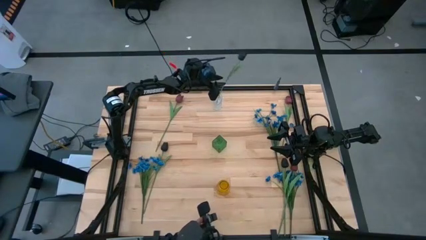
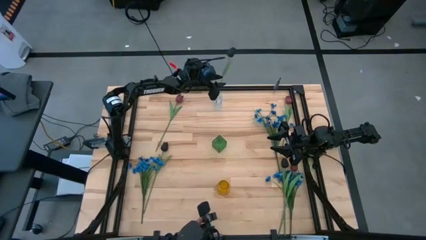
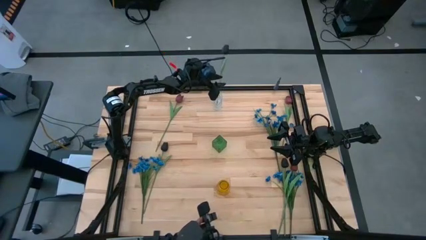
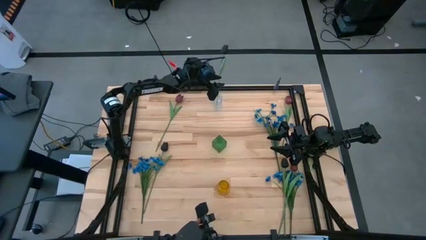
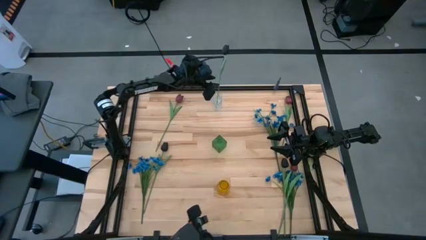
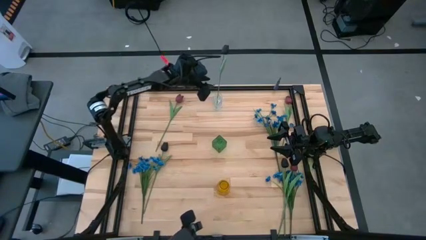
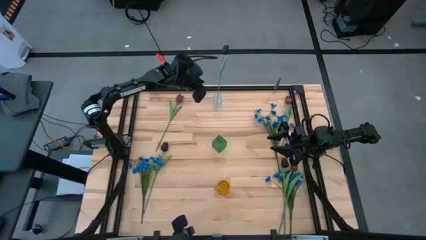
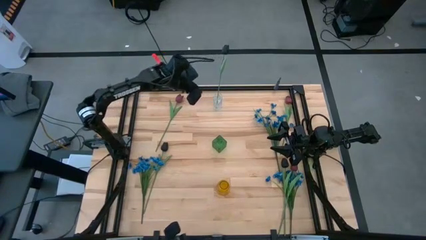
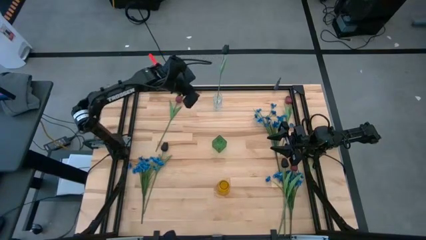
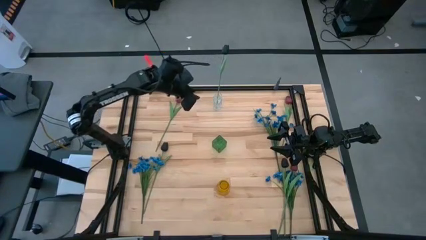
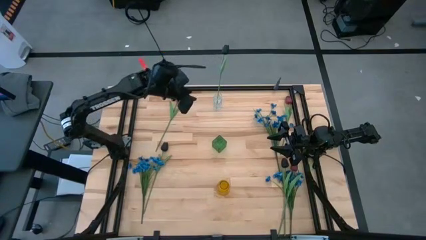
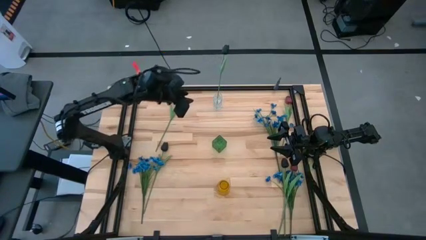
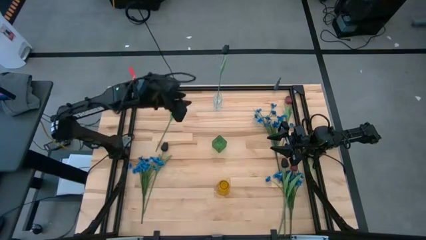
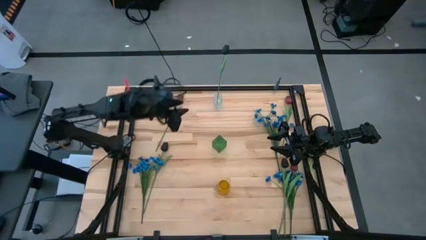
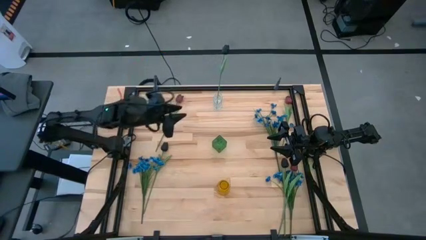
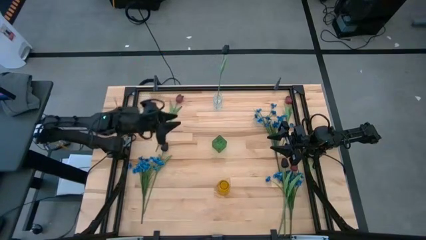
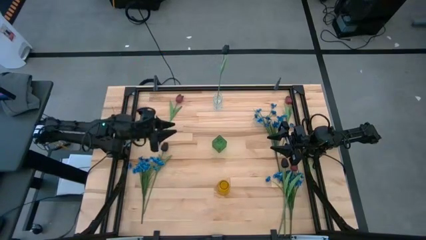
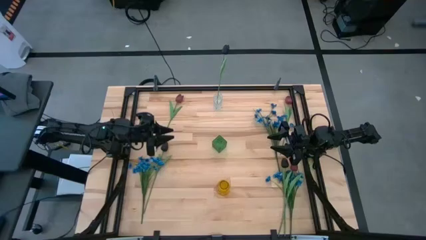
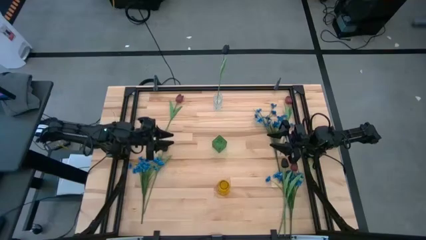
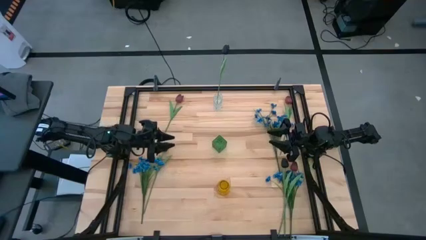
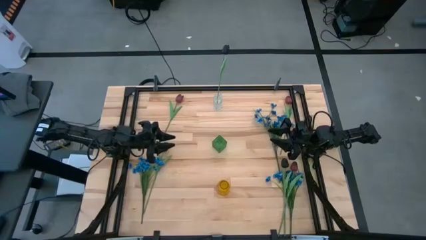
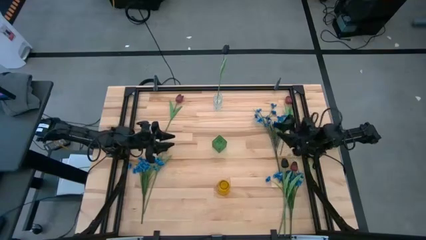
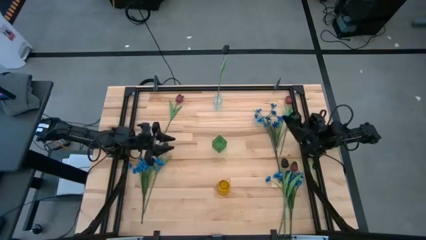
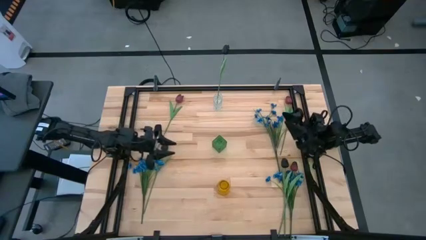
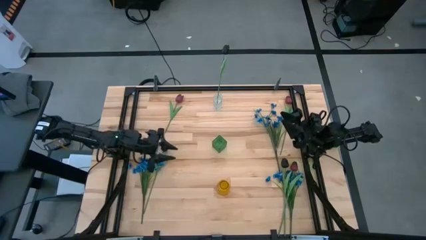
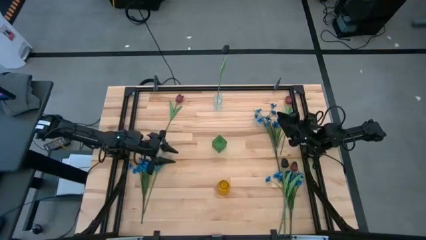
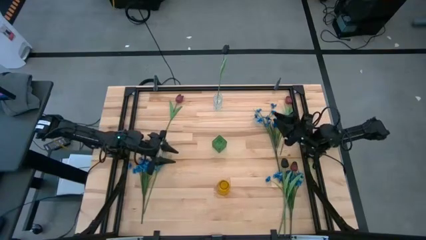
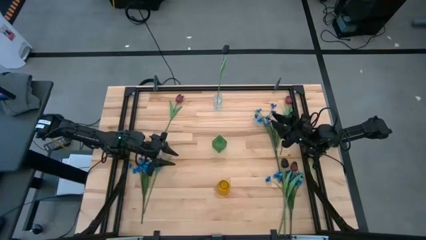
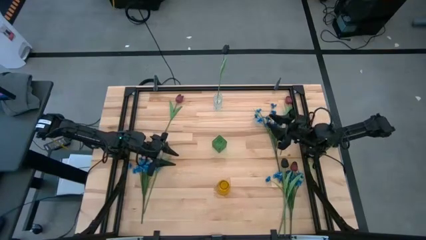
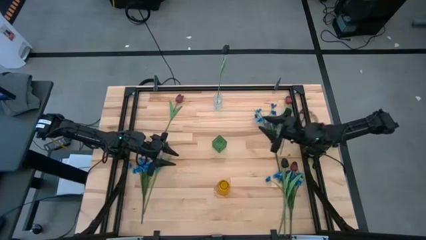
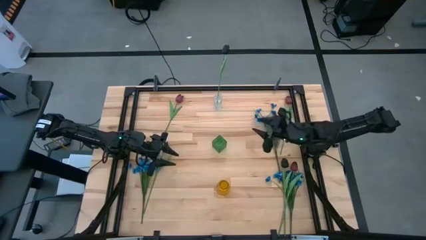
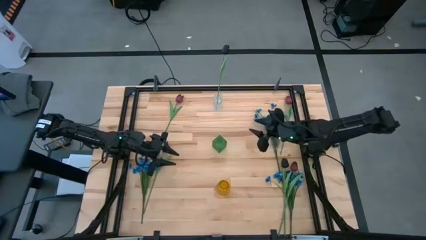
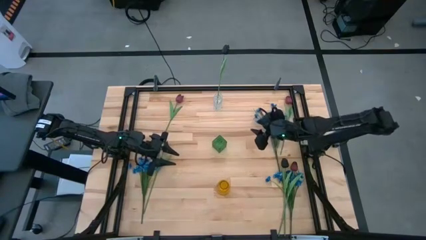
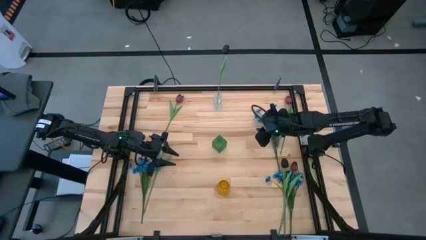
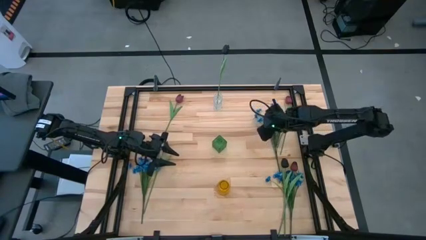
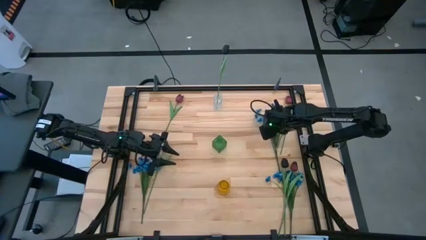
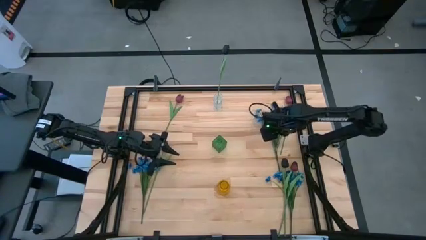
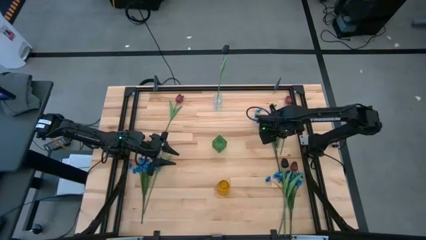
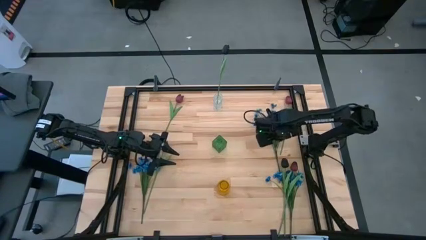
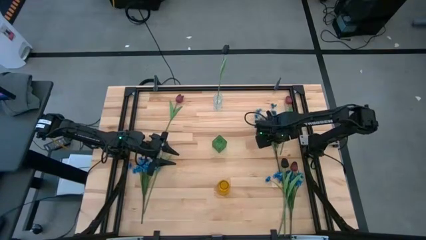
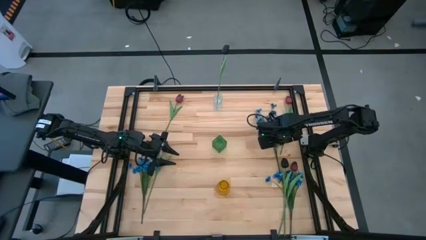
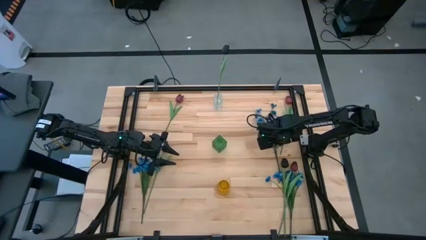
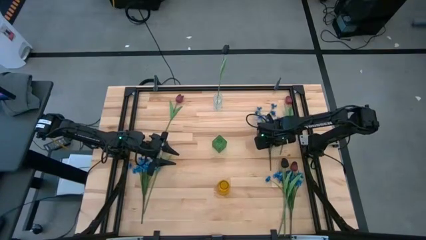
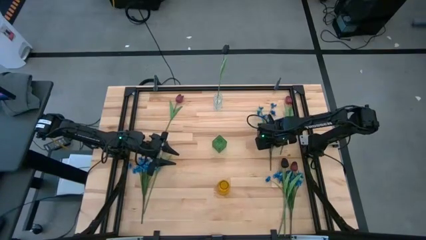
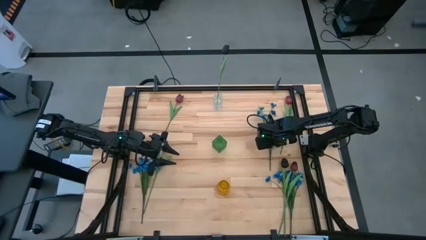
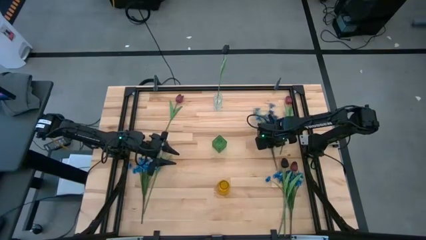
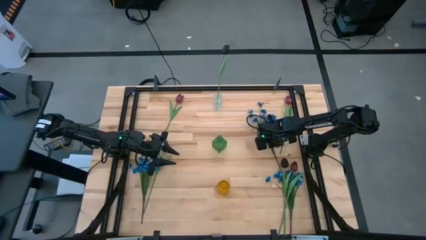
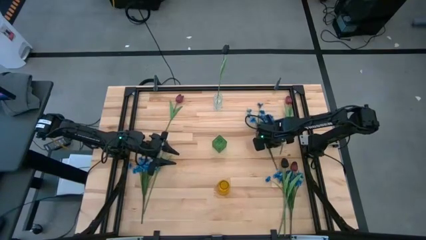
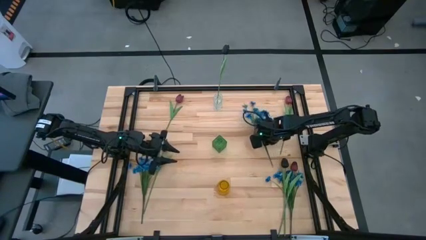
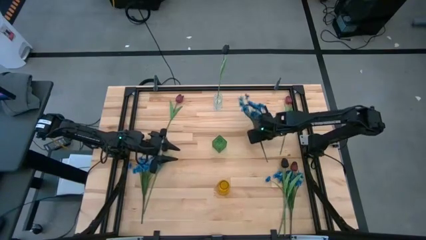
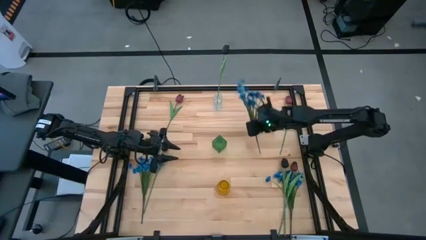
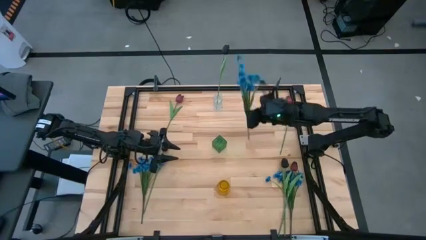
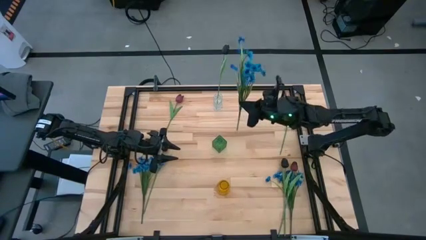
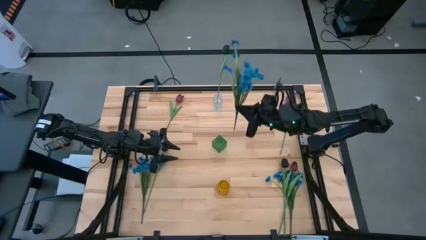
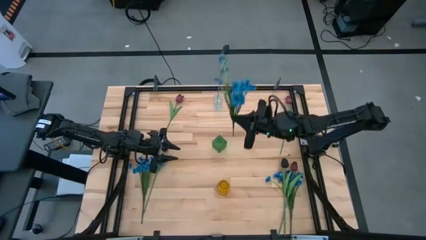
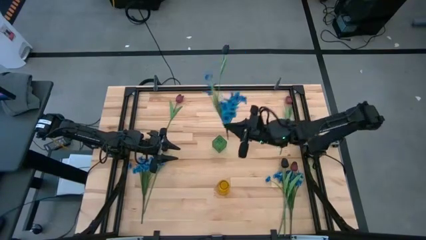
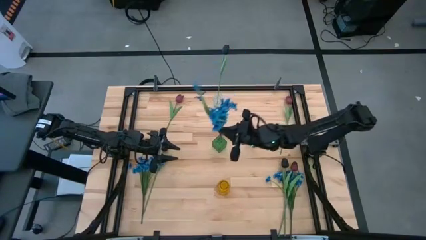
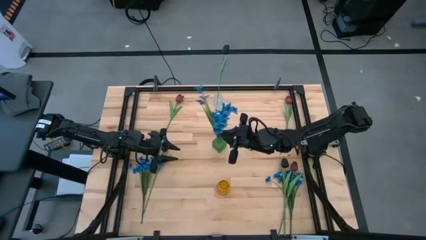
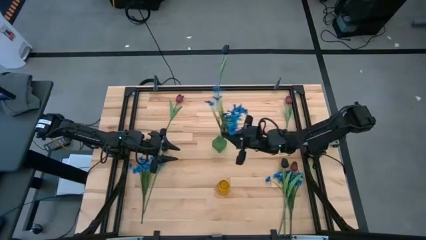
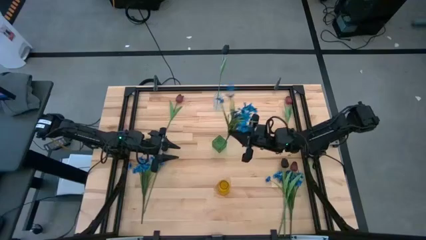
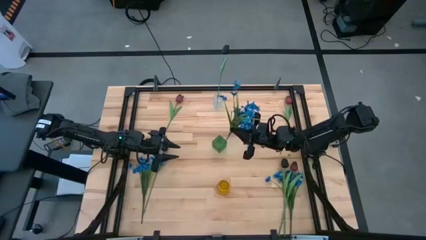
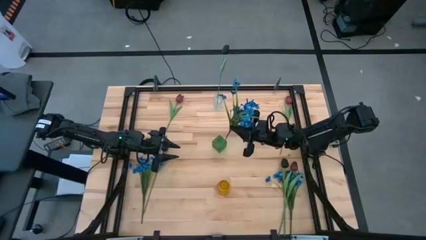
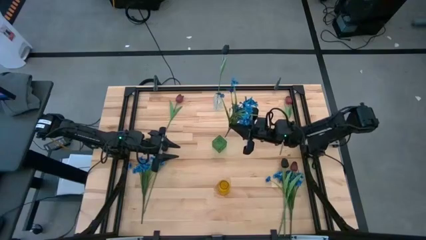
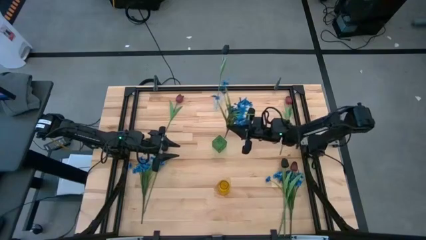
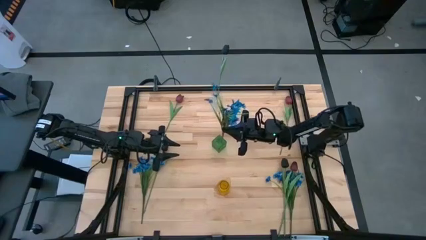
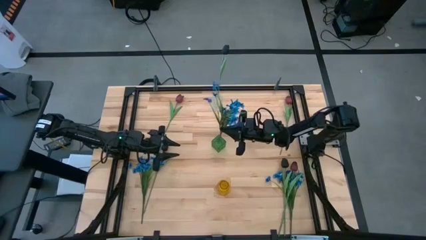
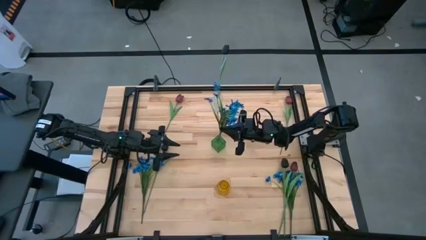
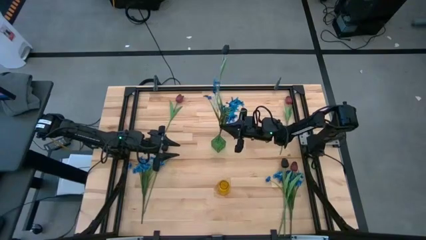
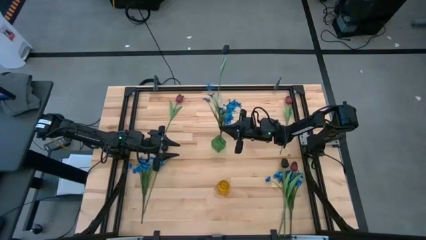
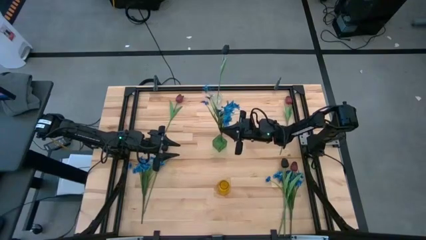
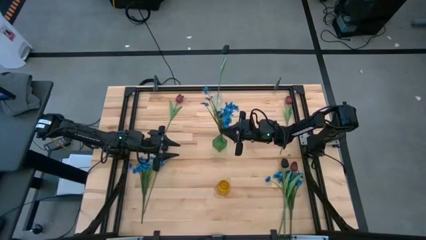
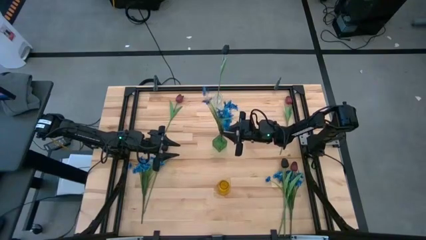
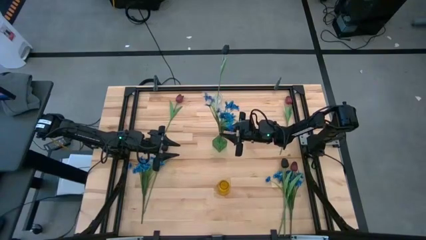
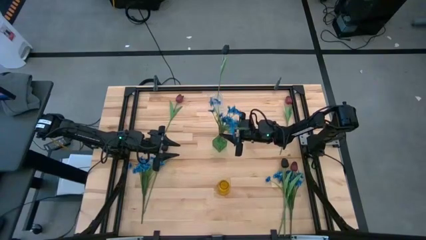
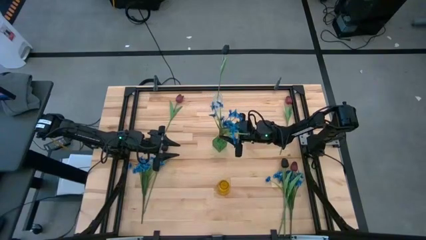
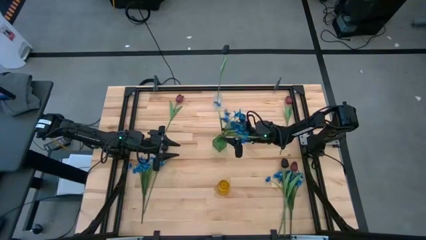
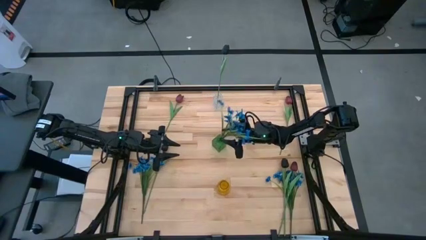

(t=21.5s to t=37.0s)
Task: Sort flowers into vase by color
Put the top blue flowers into the green vase
